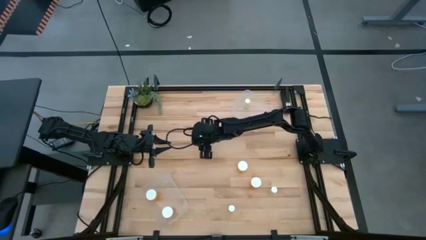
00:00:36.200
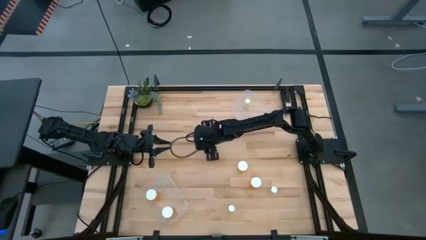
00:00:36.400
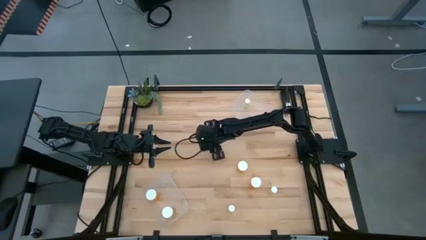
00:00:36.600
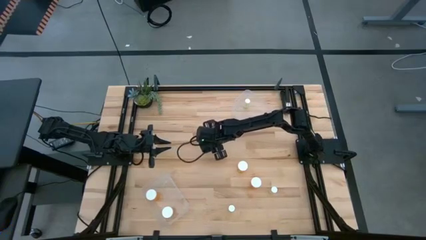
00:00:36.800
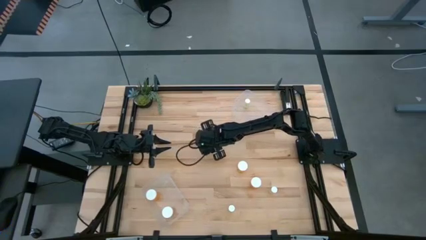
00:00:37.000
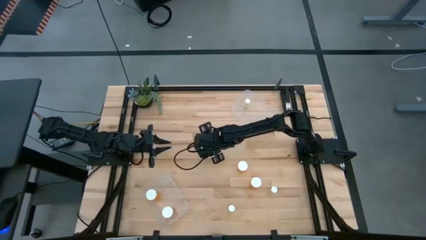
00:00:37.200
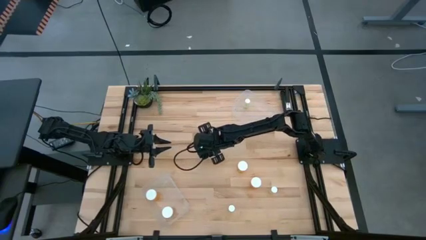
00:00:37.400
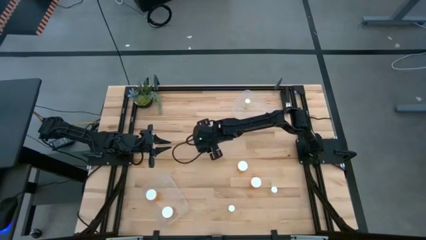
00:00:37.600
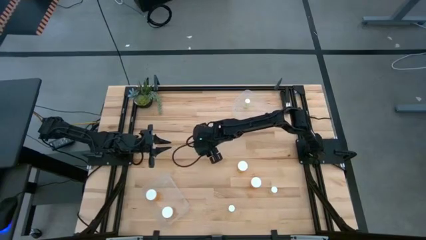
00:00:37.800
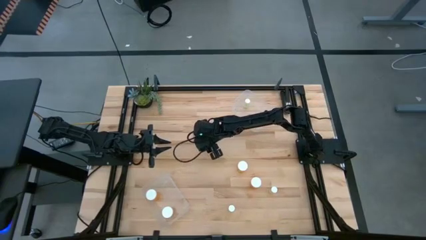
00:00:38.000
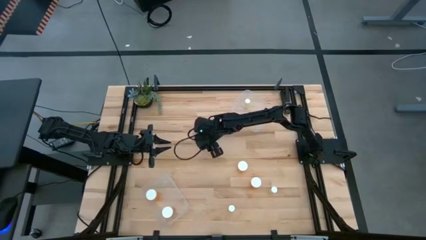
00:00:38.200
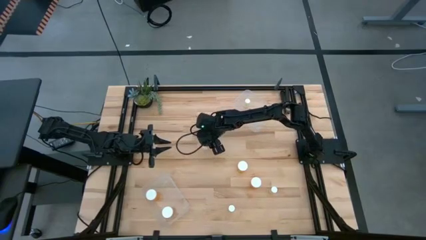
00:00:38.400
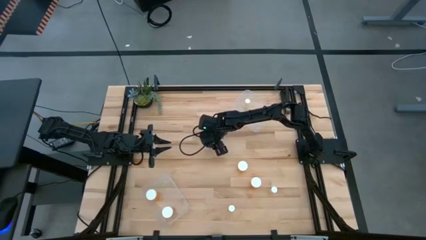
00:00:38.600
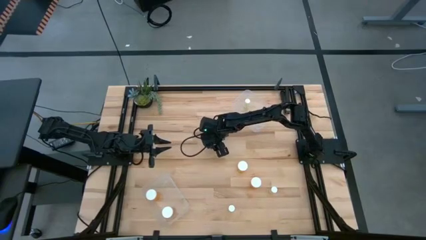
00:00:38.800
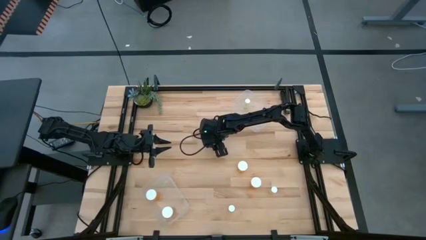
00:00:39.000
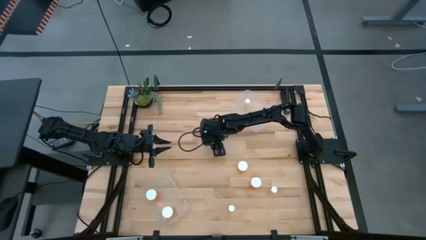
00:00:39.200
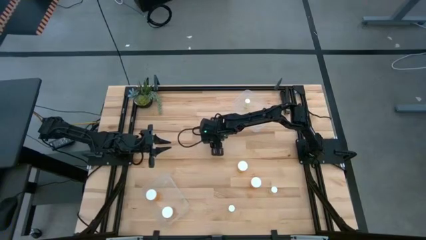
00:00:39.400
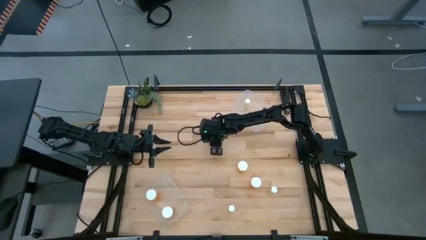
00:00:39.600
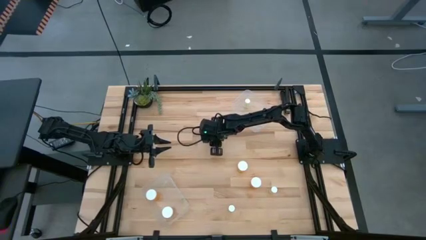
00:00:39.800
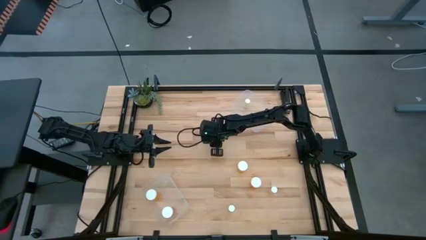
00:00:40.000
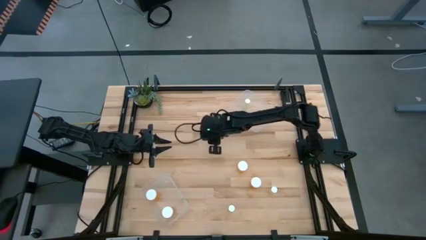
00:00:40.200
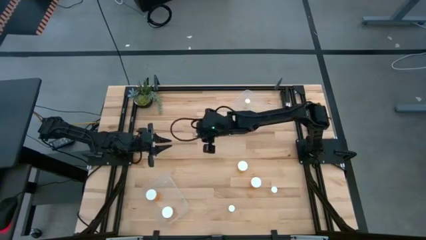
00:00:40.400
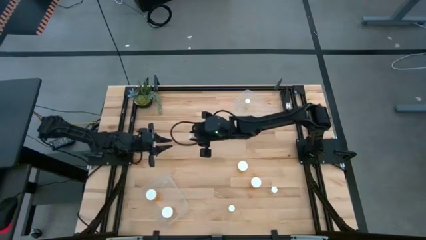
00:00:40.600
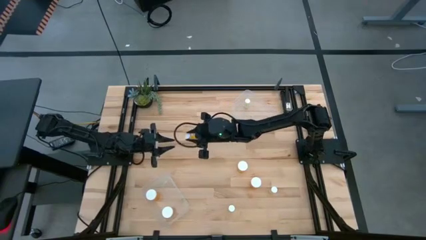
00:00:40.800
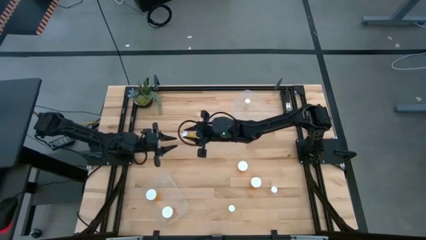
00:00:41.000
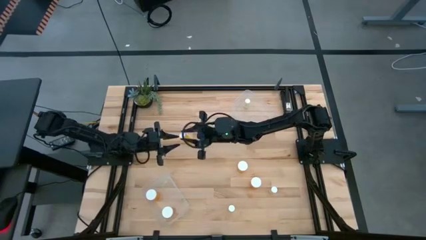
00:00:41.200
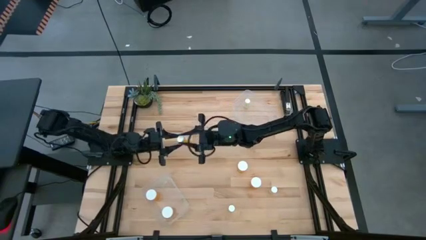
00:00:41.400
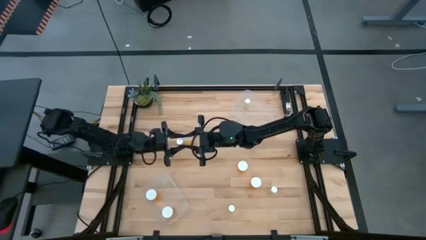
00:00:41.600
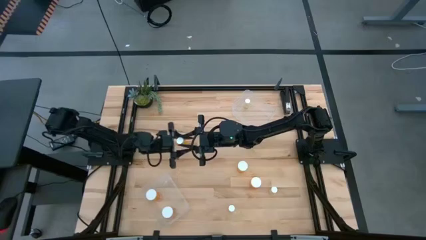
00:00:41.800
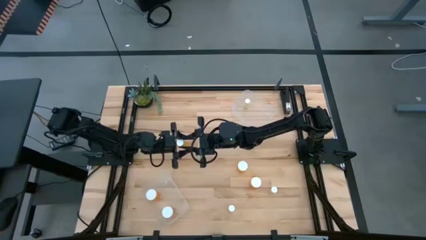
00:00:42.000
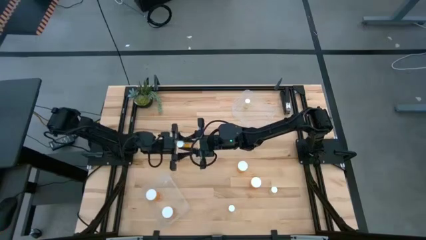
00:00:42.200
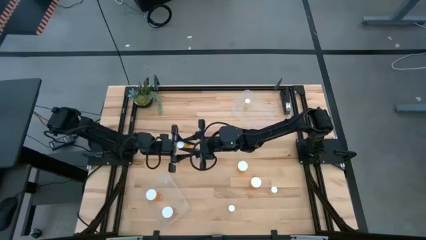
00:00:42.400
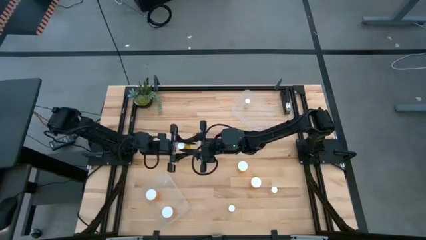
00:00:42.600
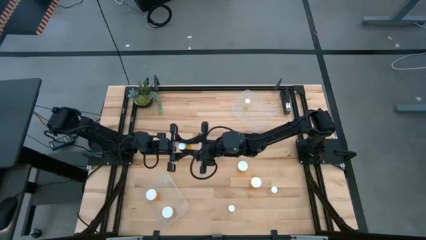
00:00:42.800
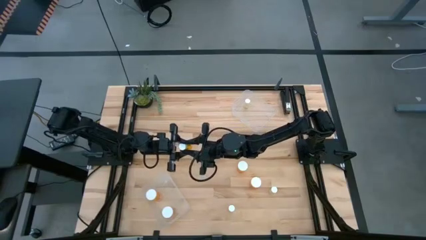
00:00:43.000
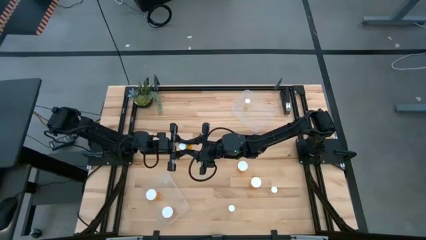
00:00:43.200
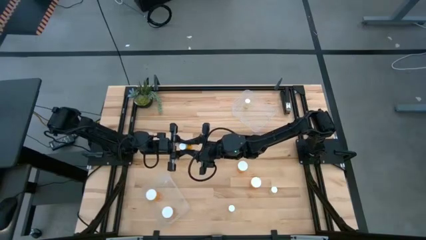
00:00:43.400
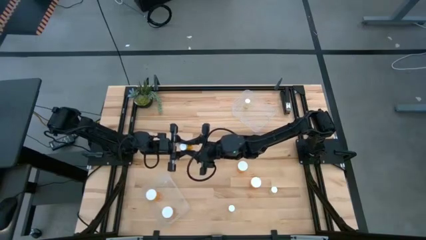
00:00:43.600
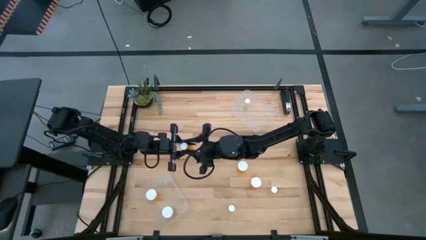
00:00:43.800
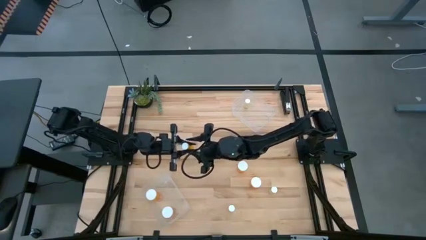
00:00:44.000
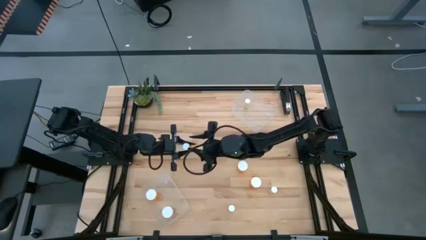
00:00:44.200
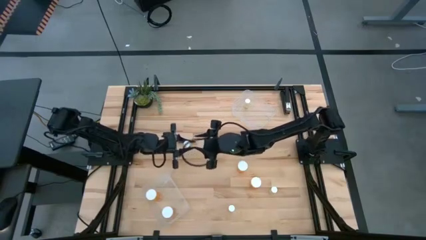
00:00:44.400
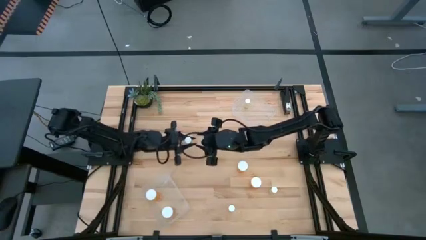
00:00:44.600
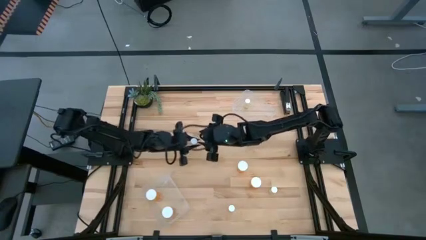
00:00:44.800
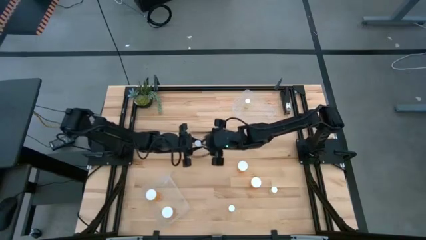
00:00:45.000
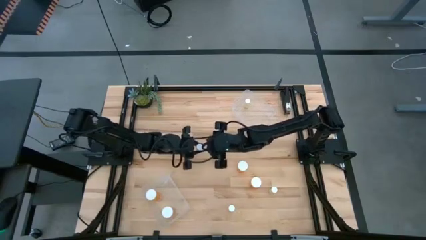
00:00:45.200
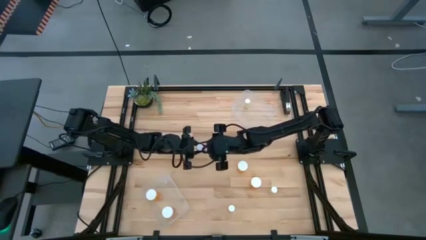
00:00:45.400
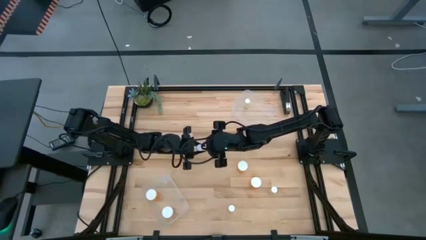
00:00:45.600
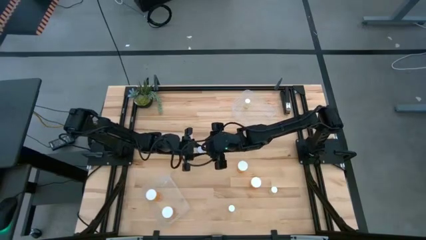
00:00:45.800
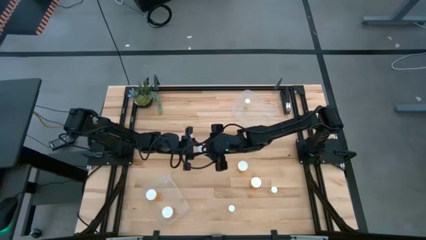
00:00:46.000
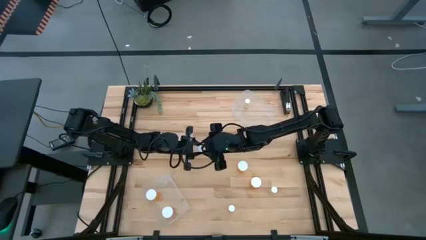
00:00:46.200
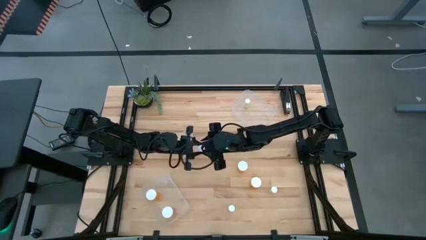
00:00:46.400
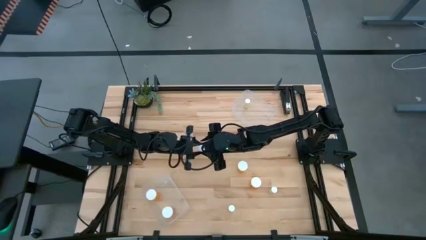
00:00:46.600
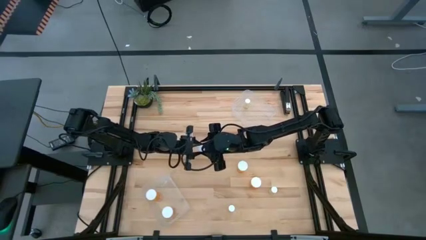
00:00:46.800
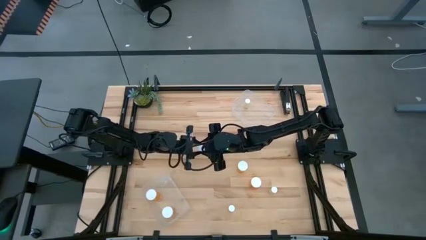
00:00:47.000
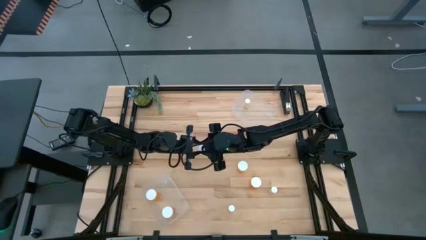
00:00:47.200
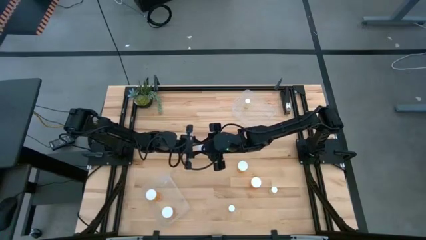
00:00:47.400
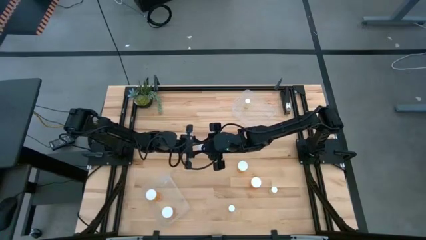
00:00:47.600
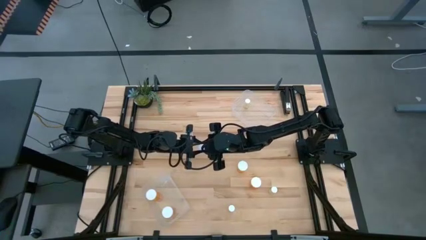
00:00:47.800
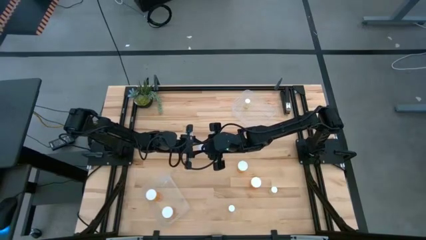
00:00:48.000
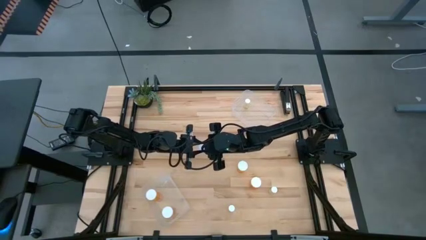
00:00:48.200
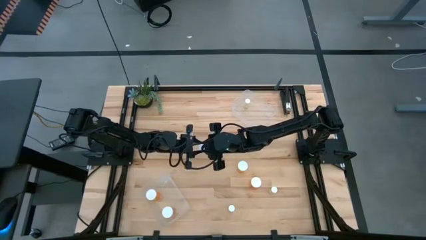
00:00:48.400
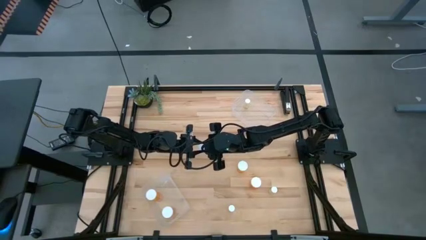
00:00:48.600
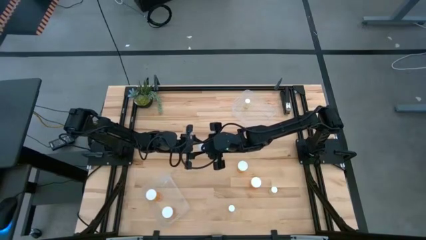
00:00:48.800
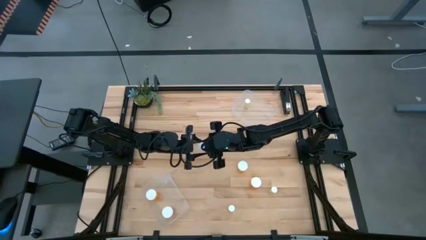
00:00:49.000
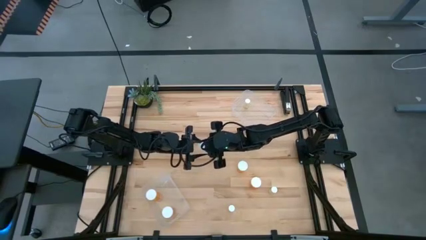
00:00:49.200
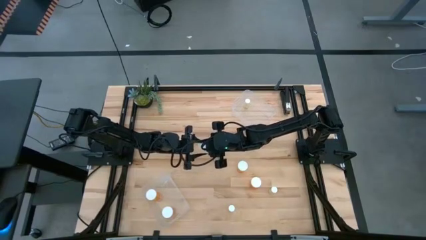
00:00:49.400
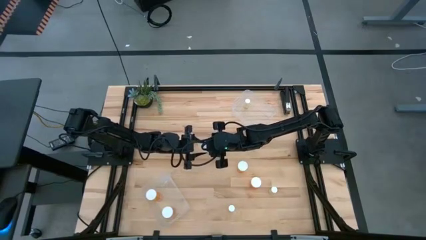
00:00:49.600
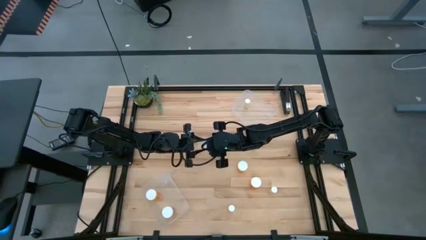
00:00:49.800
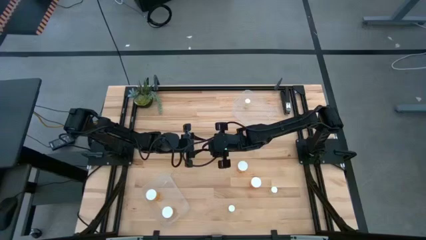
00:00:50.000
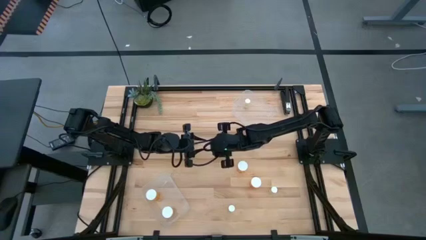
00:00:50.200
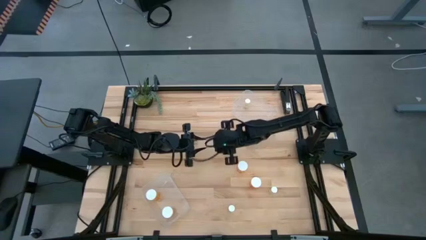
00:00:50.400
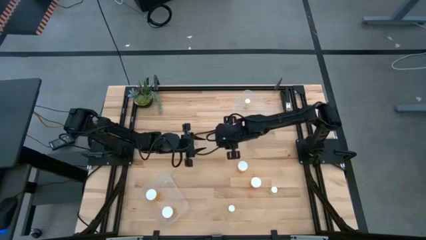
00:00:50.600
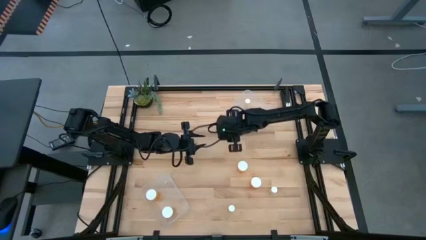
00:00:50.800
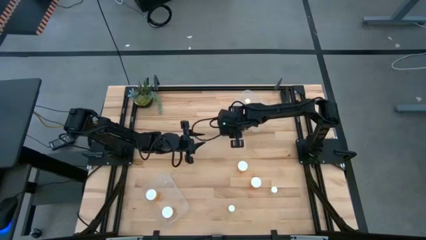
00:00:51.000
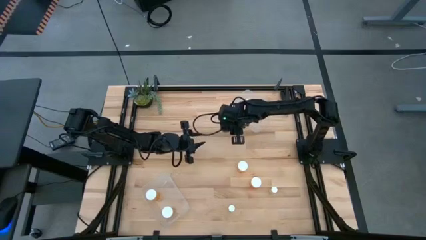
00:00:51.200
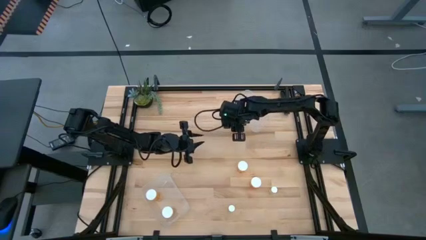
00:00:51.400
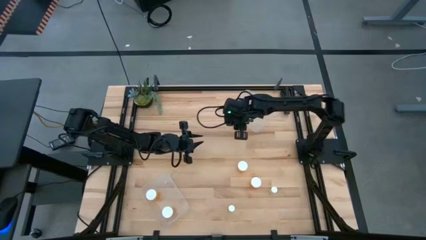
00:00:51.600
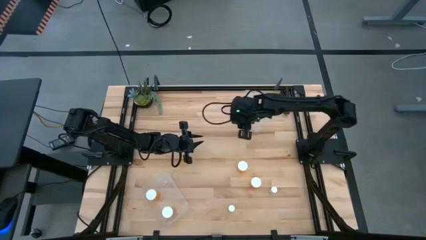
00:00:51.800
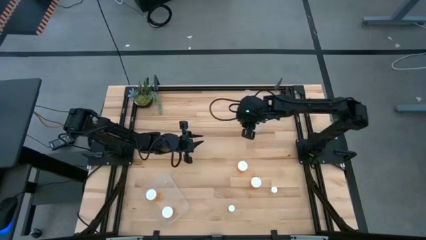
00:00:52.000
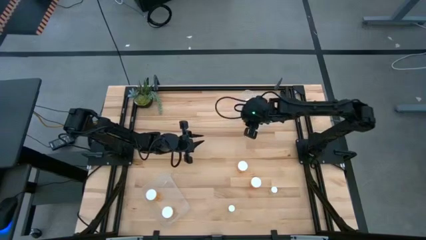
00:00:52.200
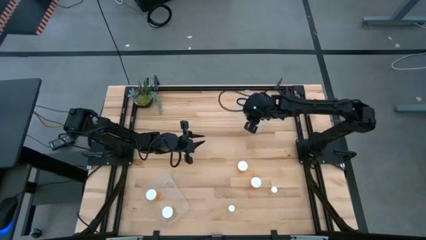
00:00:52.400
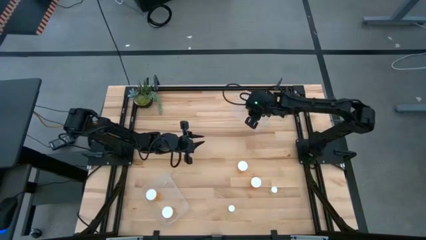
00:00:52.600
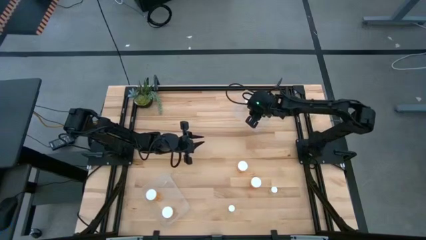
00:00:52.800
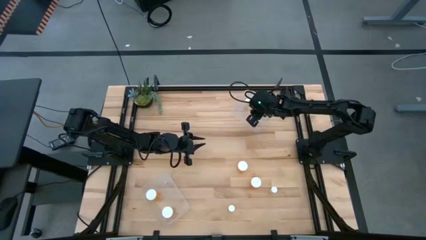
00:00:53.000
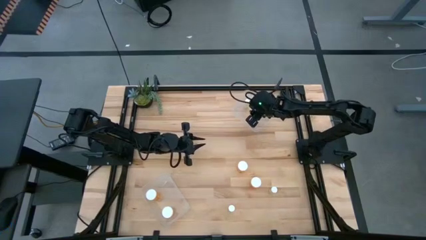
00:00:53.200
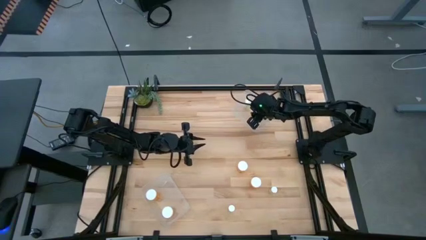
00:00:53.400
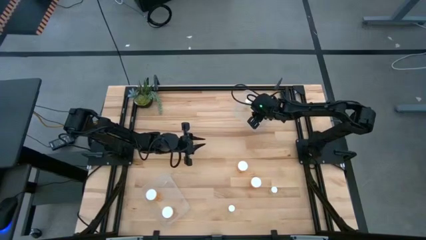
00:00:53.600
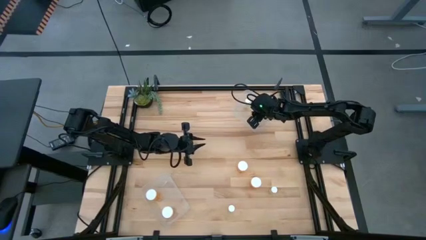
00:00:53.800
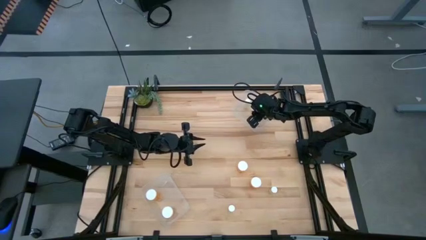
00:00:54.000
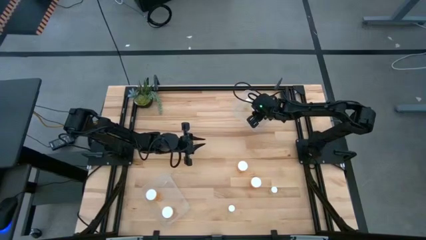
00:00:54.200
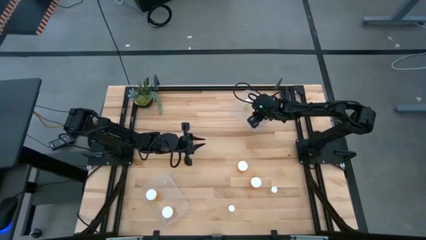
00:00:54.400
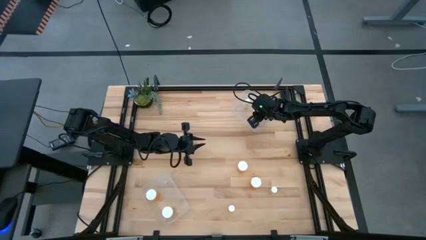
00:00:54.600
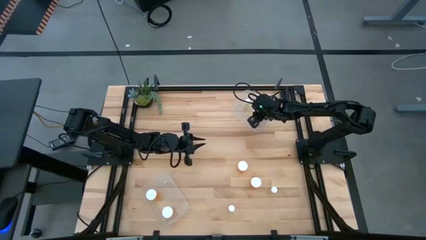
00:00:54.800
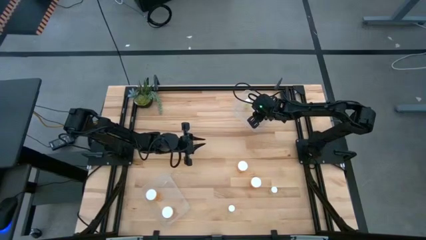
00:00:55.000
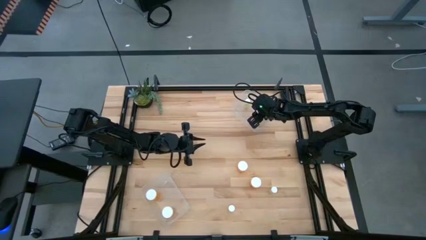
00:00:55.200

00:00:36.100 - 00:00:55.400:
Task: Pick and place medicine bottles into bin by pill shape (circle, oval)
Put the small orange pill bottle into the top transparent bin
